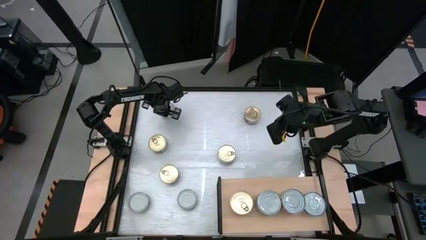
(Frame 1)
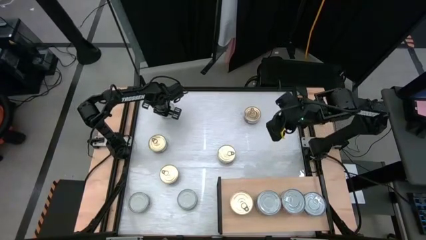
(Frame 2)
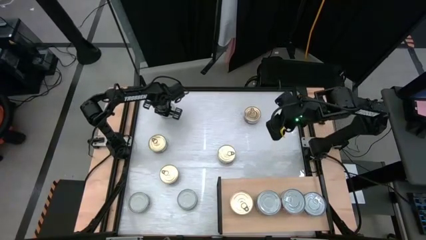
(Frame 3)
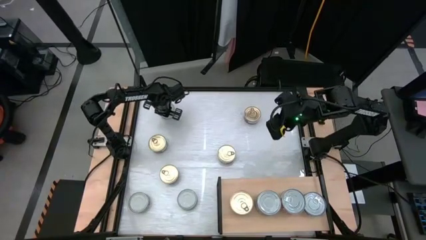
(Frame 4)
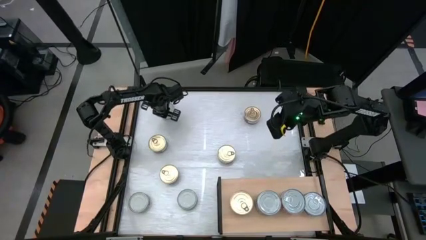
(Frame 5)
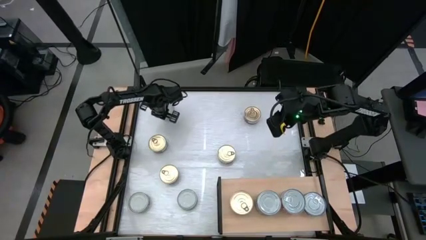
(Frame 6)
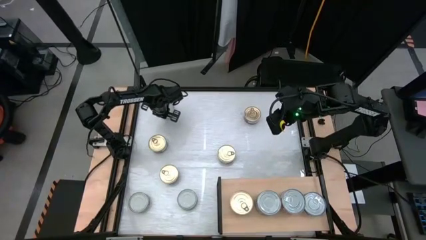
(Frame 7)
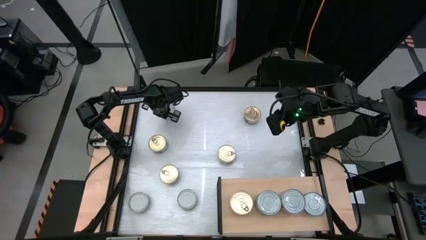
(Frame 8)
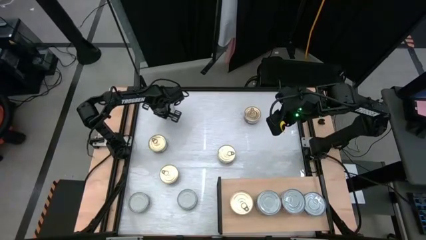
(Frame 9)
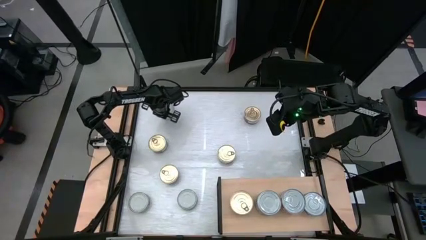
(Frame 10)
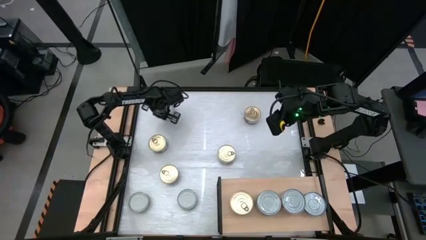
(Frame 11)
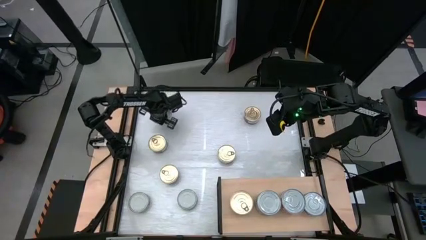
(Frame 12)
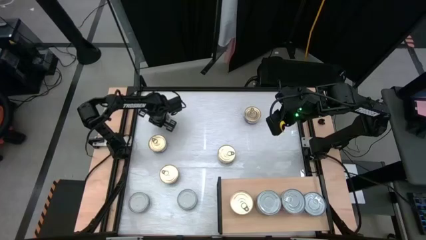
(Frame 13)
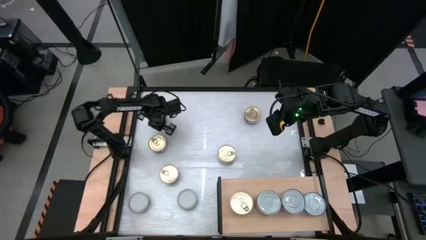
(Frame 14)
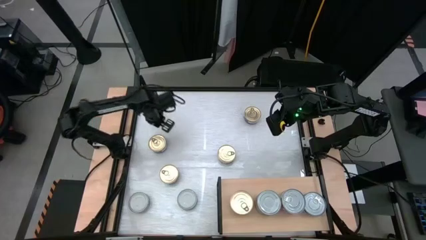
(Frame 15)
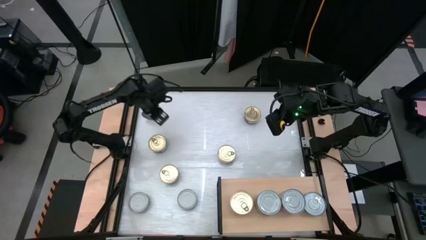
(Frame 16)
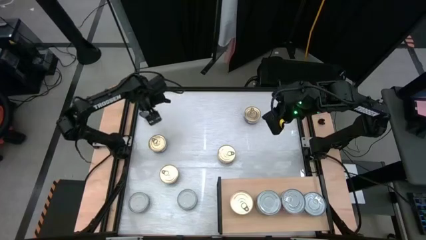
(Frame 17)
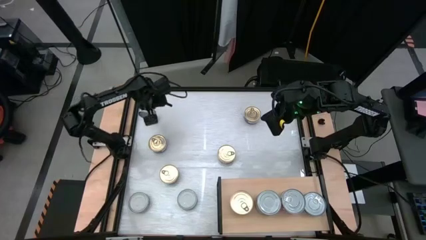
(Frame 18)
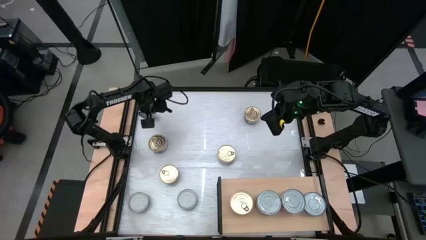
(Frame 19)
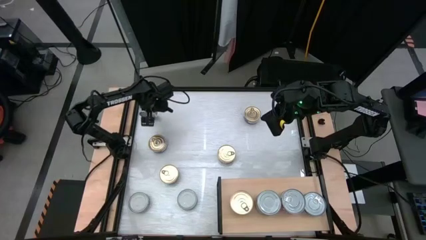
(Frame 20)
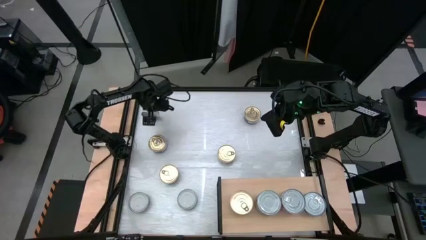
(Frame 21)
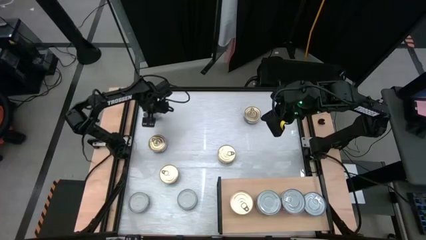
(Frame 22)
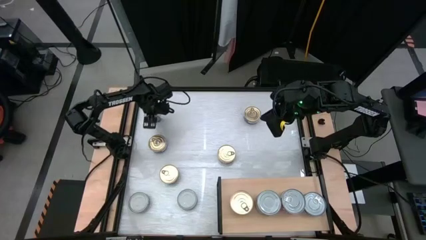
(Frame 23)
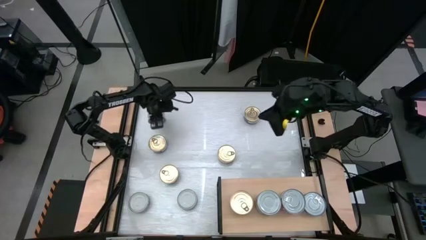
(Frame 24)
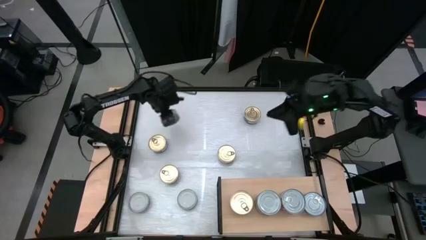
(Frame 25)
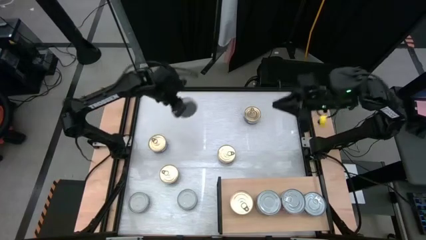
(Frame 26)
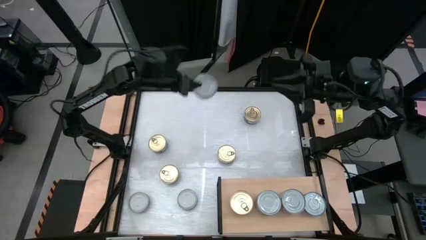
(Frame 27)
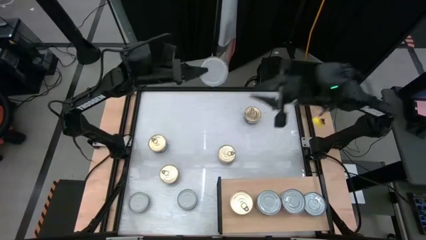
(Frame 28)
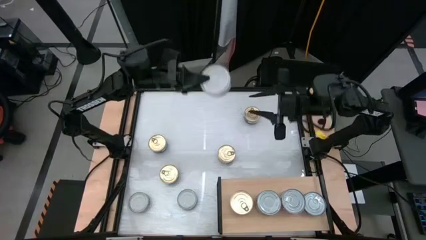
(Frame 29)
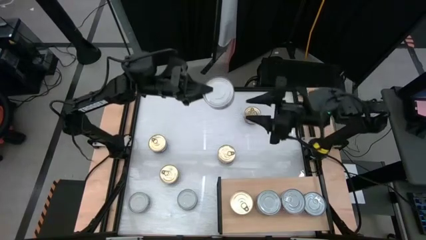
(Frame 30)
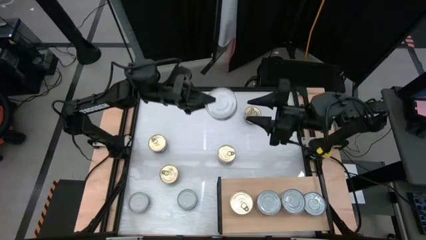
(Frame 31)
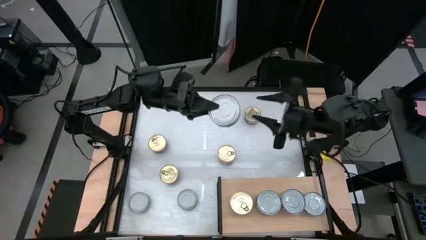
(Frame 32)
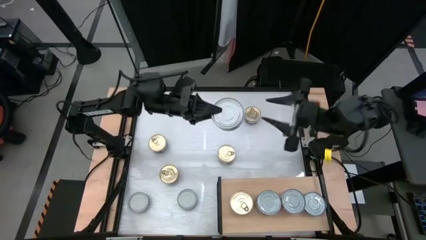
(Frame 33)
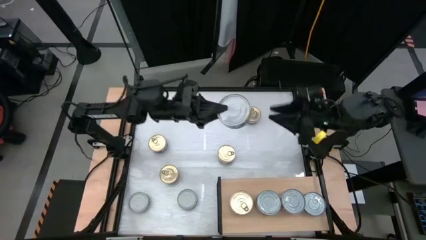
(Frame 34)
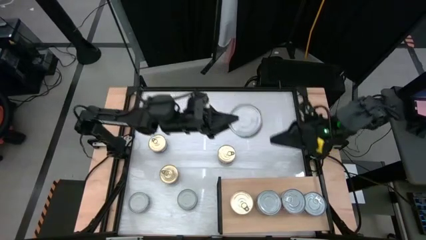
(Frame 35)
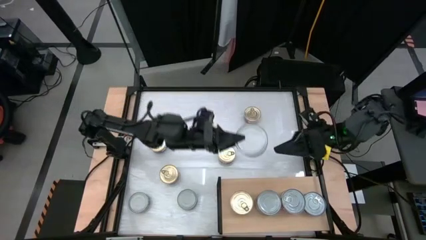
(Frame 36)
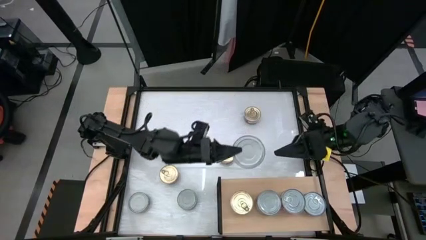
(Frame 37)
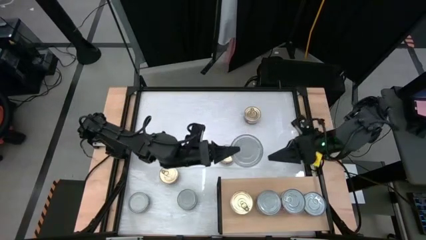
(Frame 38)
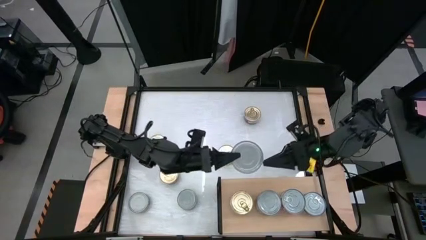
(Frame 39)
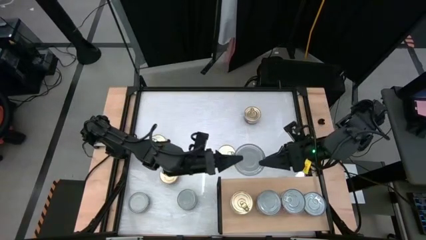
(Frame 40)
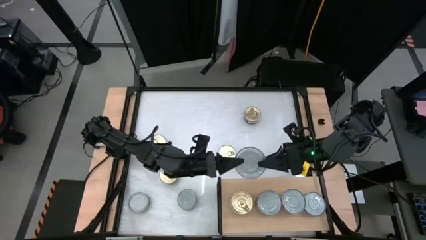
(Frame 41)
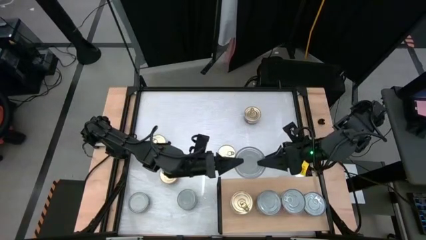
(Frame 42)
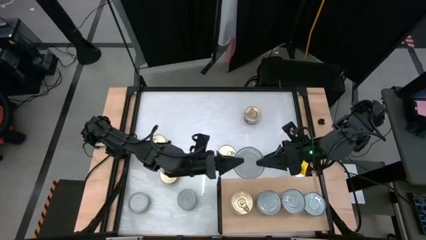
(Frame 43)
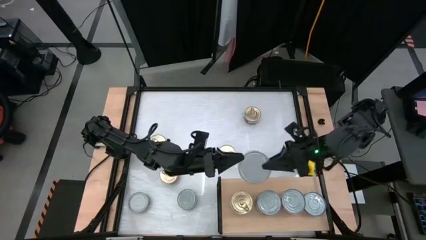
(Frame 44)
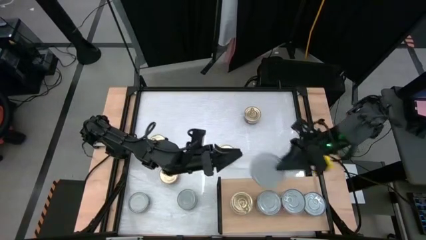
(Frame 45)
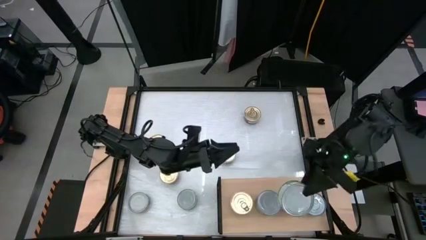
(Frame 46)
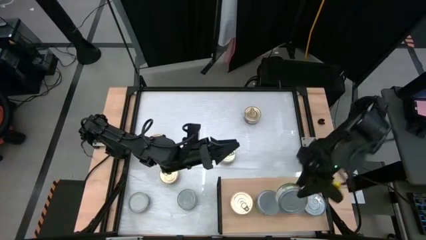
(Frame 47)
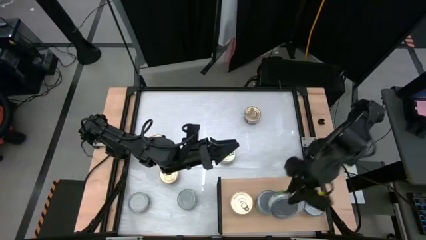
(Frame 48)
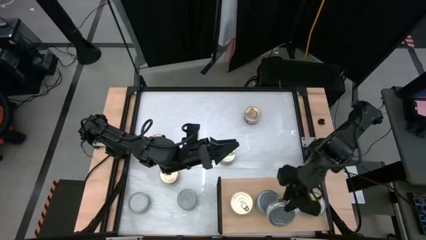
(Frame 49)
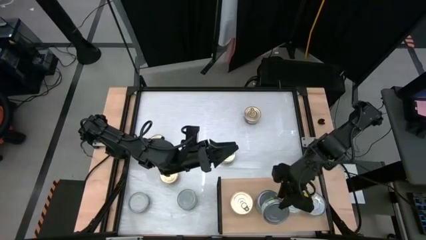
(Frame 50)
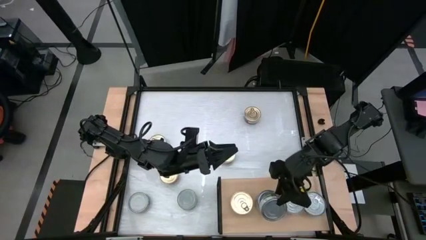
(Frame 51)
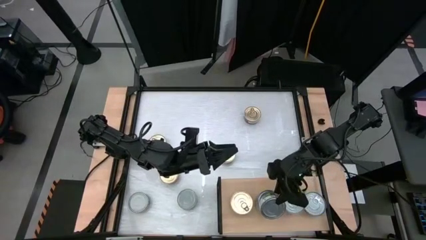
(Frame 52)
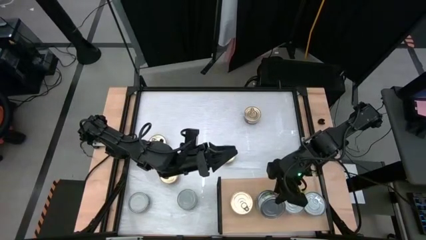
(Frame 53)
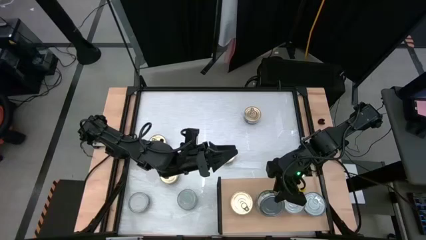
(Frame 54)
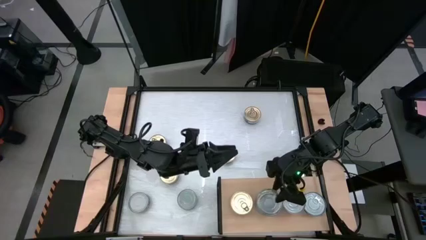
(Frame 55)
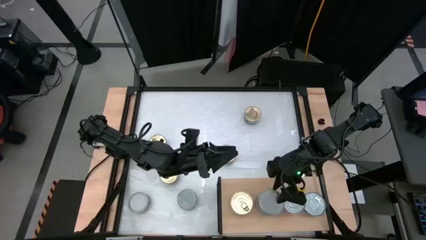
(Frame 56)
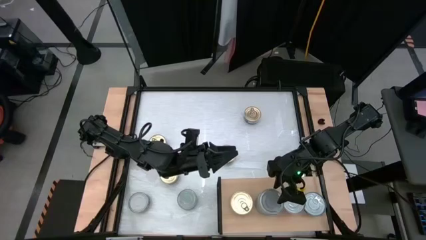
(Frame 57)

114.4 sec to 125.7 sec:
Task: Stack canned seafood by type on shelf
Stack the green tuna can on top of the other green tuna can on the shelf

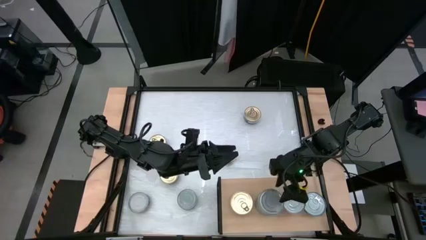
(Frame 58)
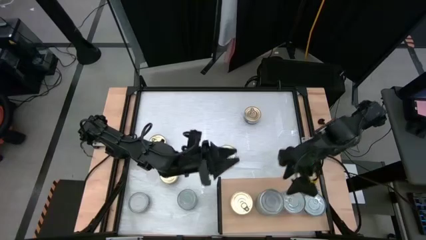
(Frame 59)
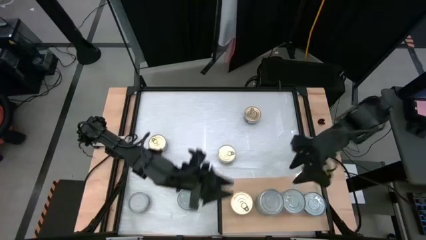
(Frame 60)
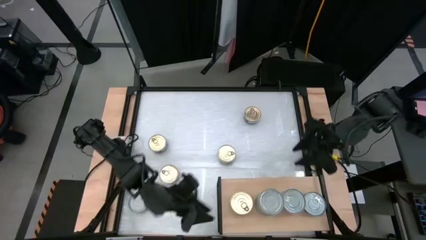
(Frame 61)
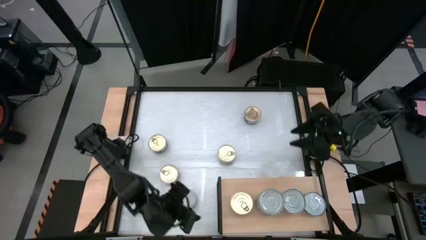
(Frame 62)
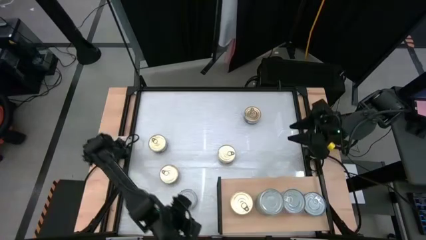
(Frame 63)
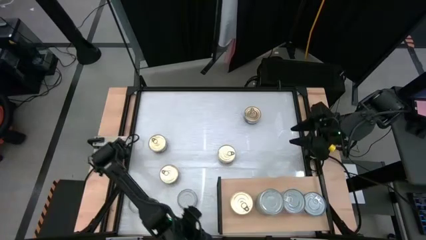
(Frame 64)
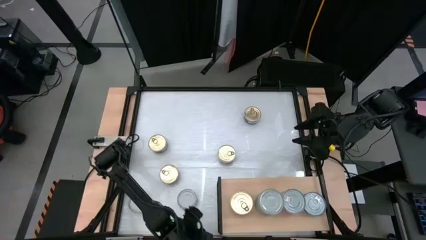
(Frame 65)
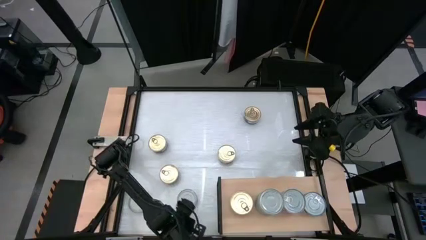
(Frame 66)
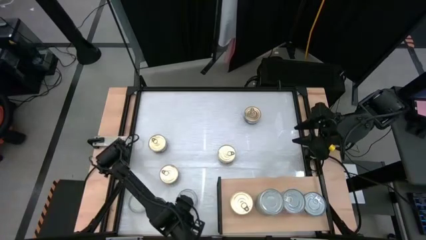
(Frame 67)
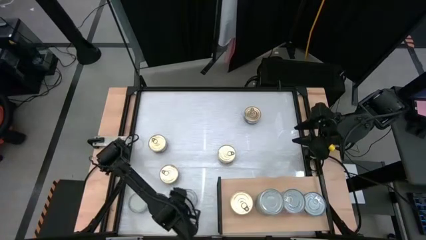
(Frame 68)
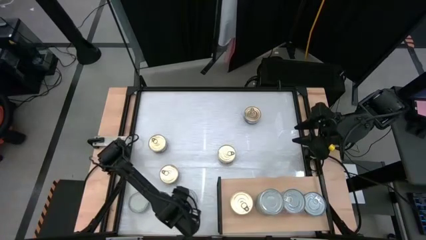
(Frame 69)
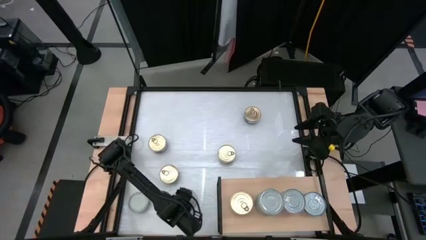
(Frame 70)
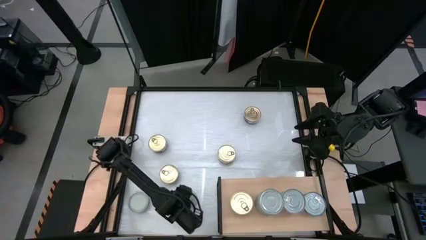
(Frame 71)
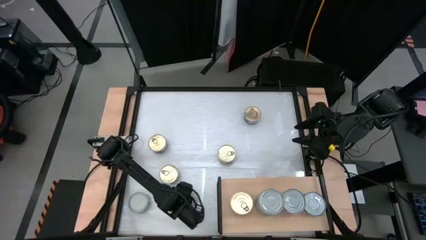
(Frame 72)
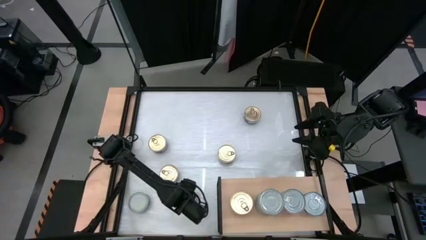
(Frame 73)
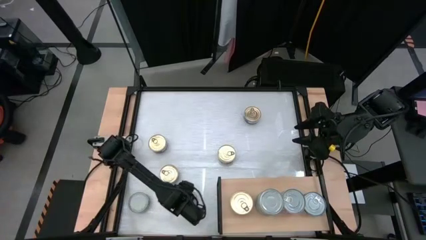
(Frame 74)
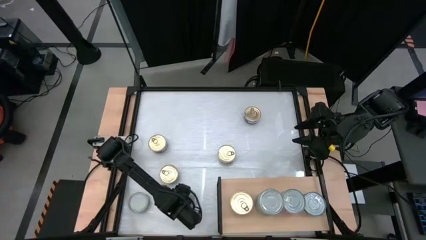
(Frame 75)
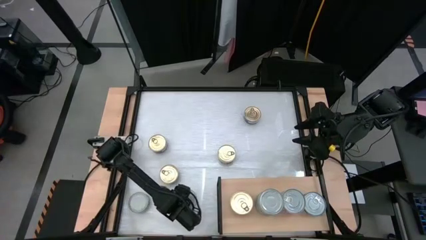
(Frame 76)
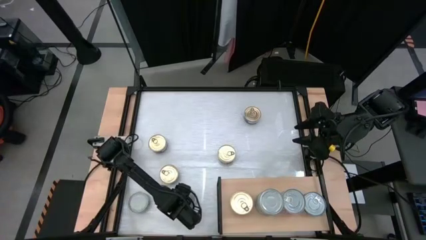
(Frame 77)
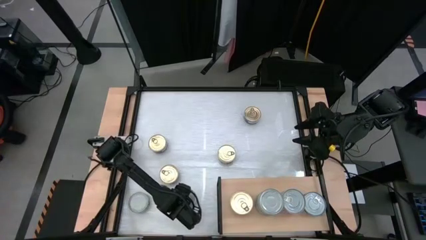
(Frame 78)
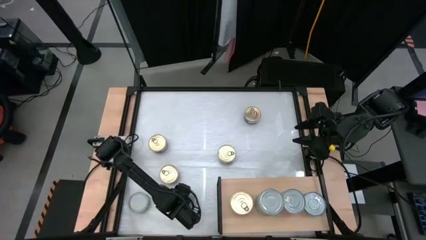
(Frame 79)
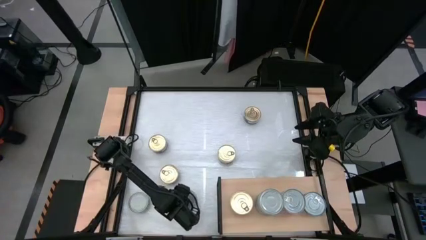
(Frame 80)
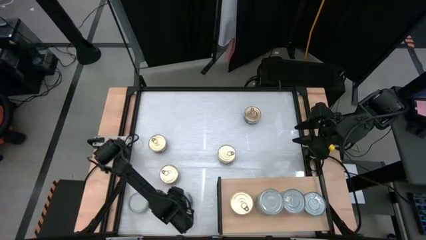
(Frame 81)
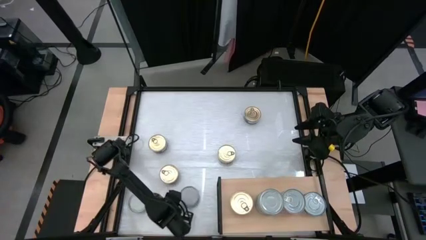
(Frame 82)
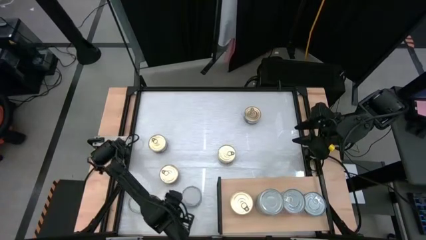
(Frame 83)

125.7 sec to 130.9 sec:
Stack the green tuna can on top of the other green tuna can on the shelf
